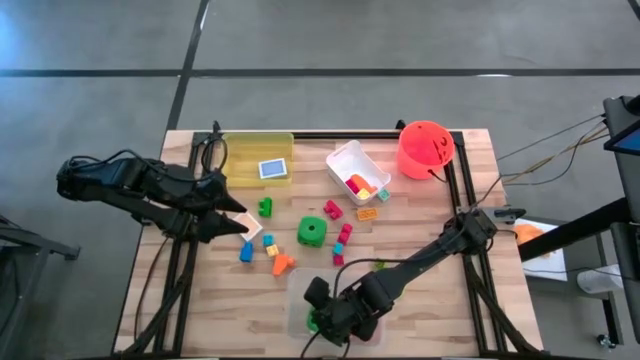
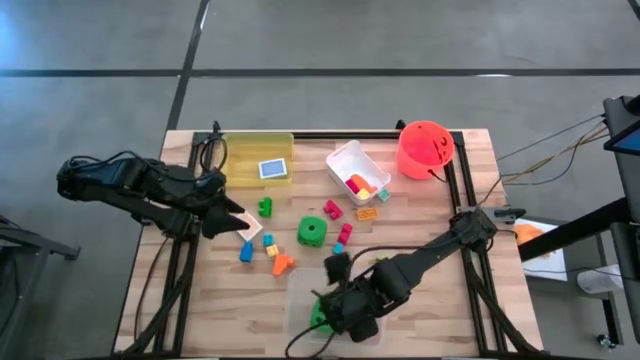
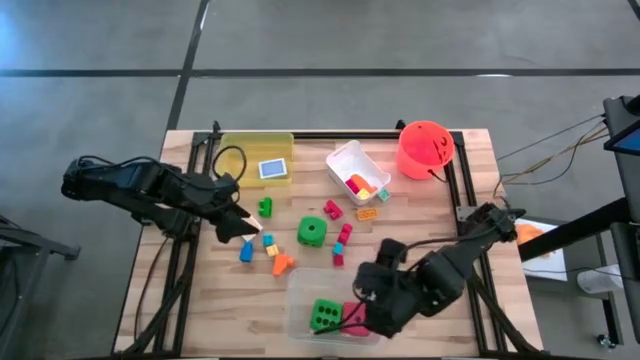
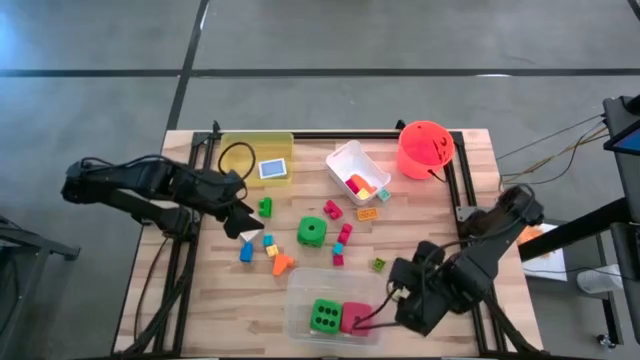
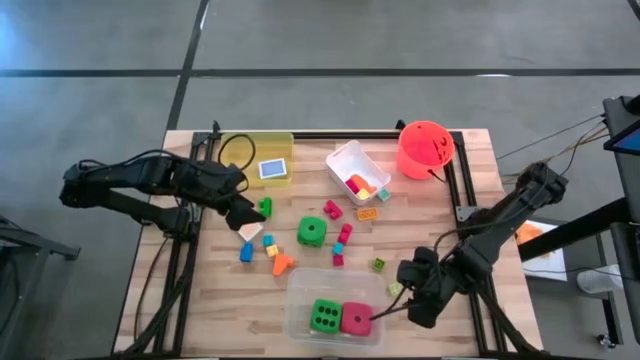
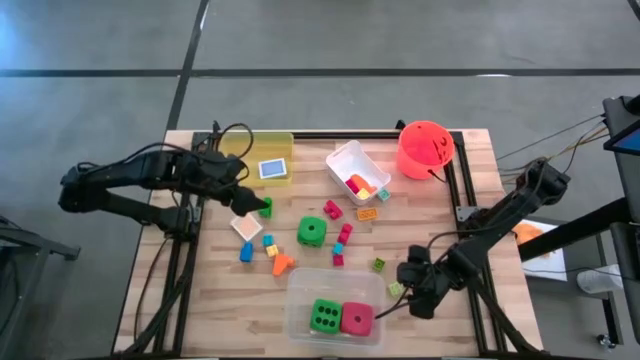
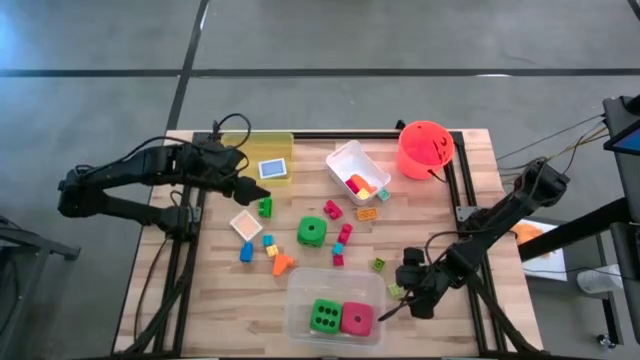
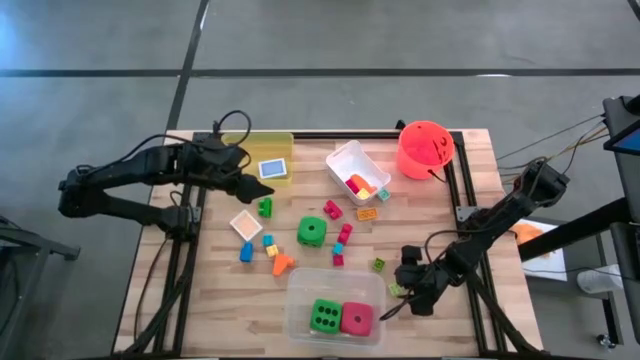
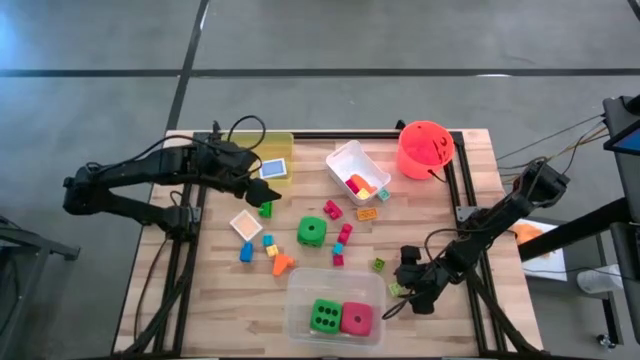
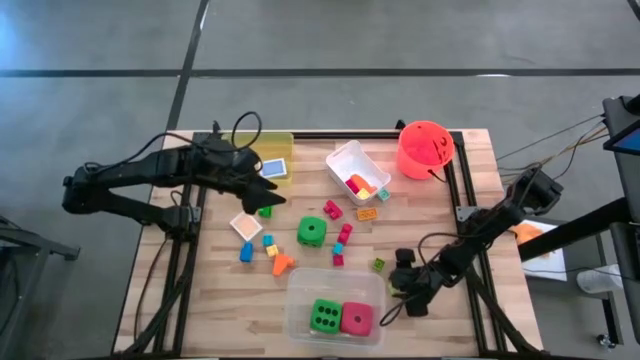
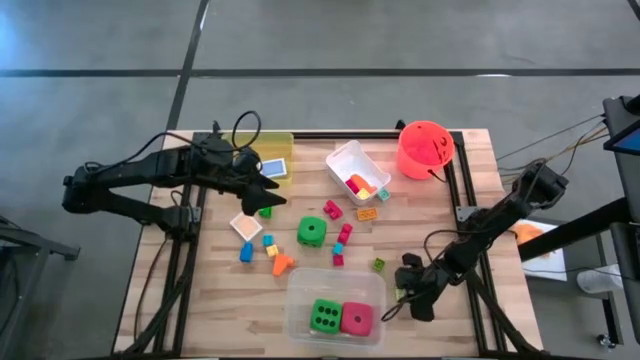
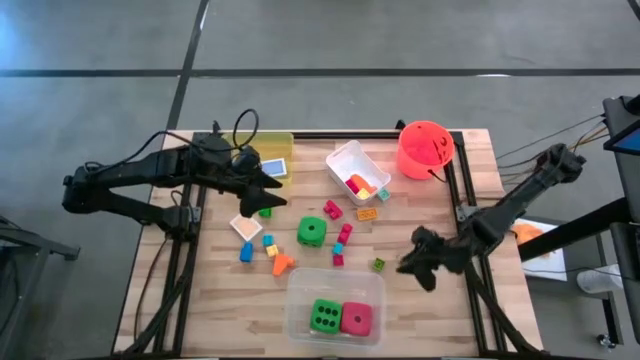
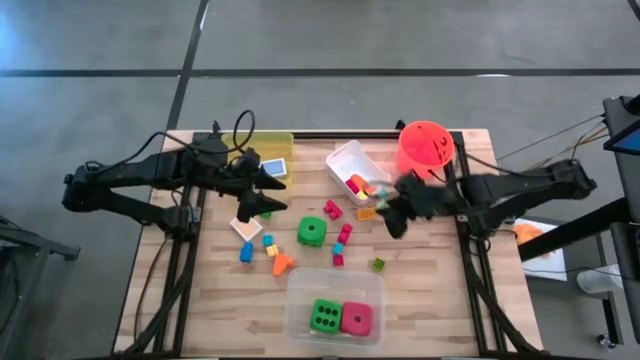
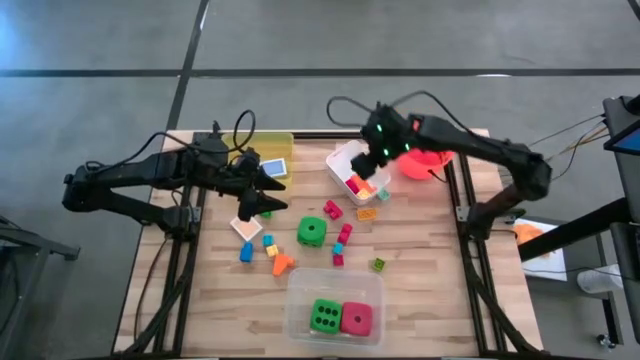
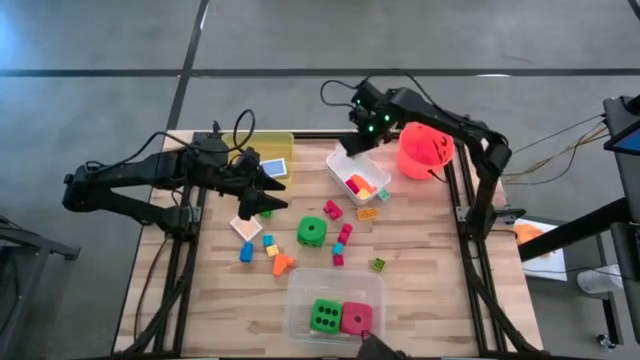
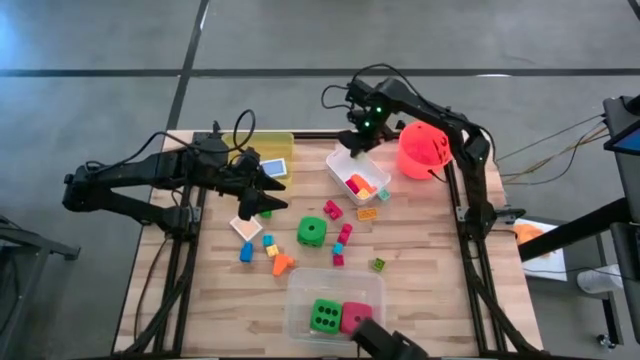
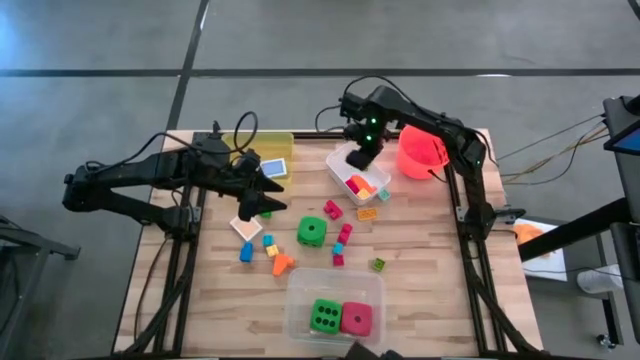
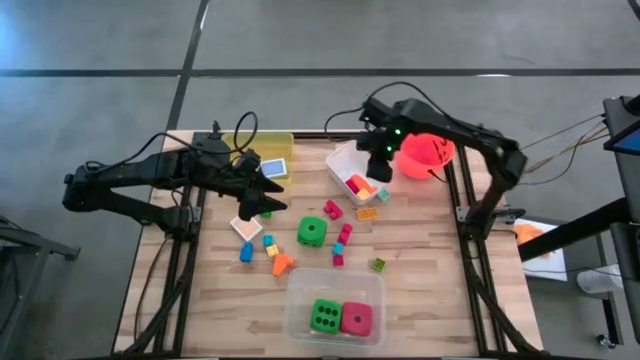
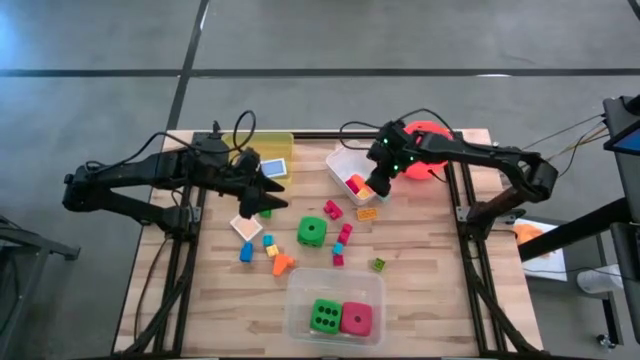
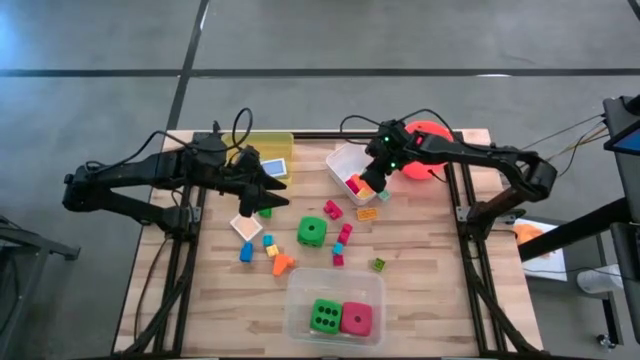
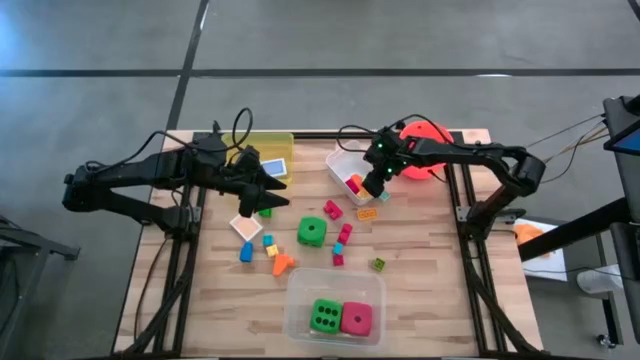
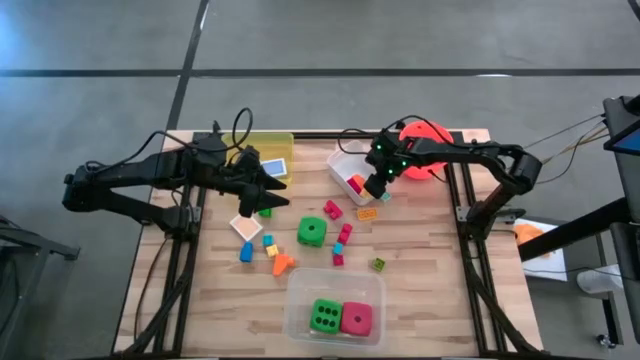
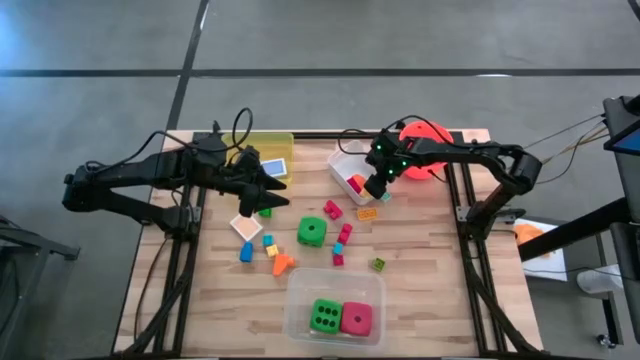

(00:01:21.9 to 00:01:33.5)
Task: Pick & Place Toys
Put the light green game piece into the white bin

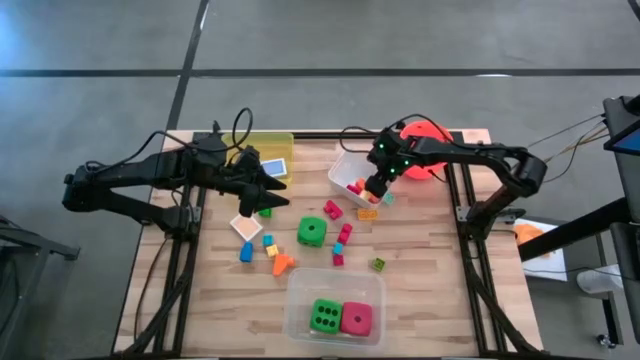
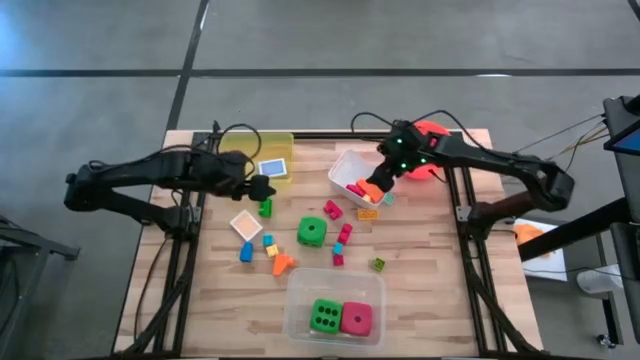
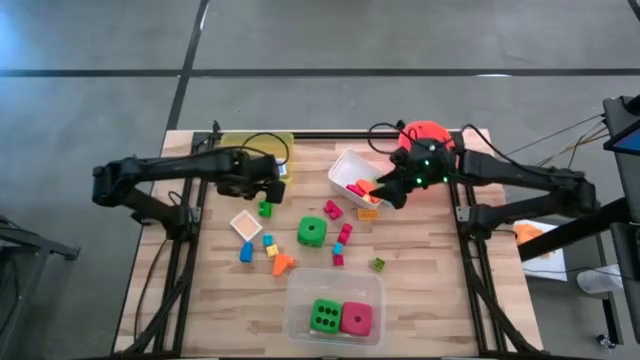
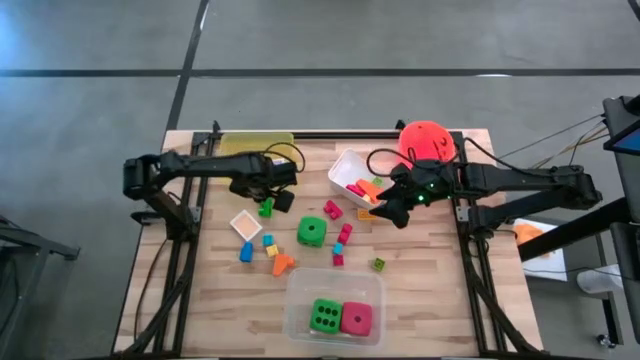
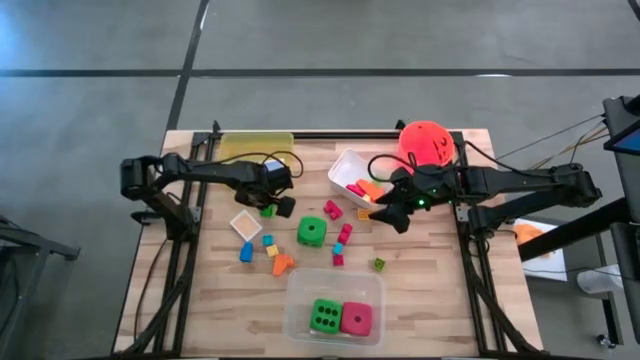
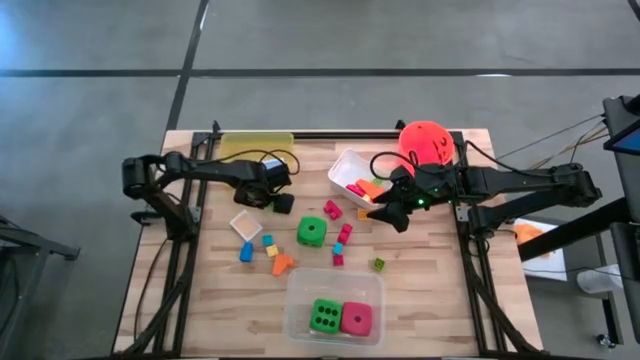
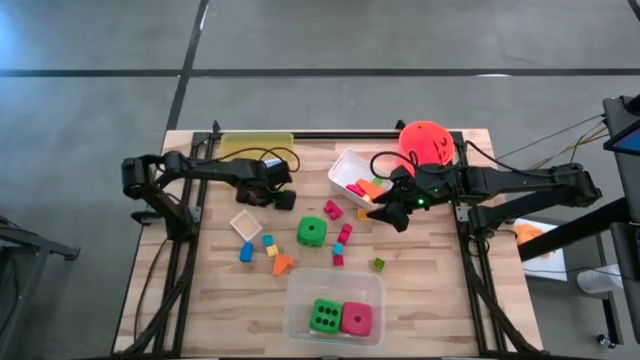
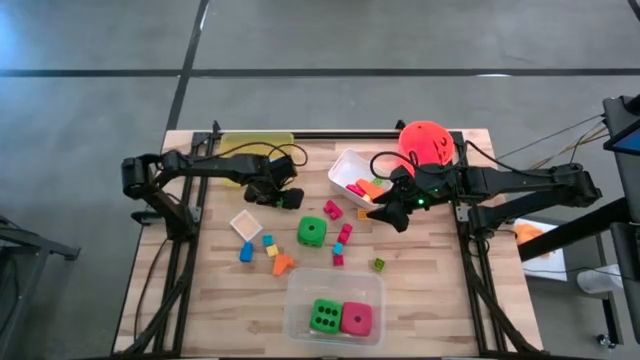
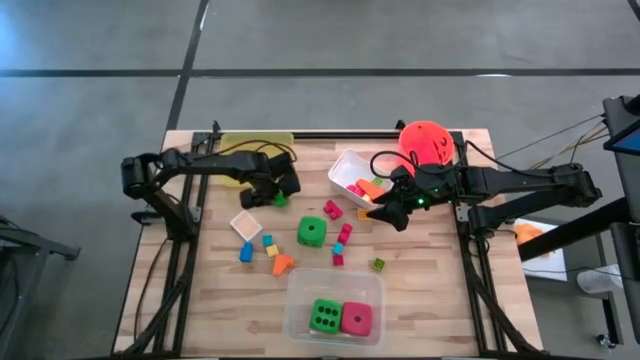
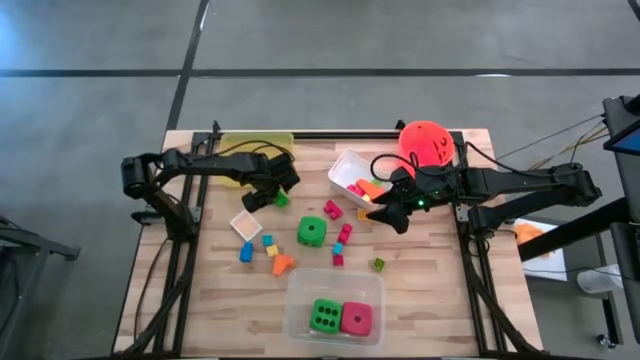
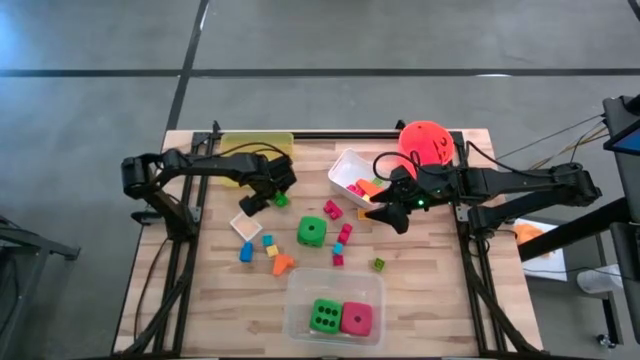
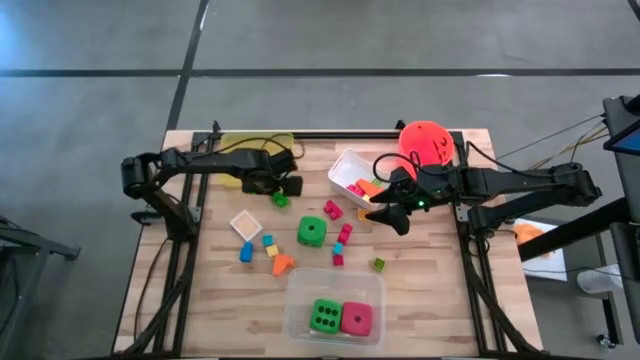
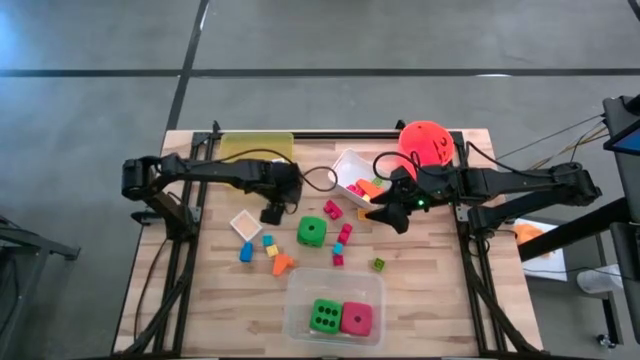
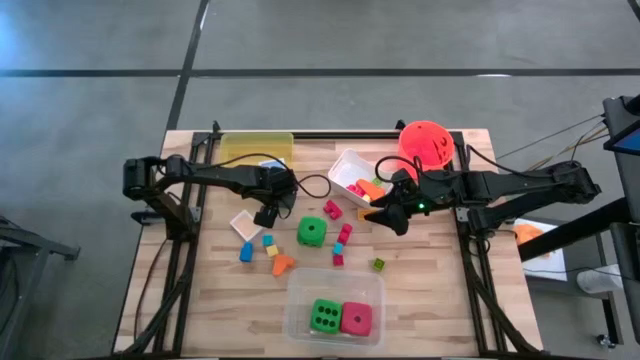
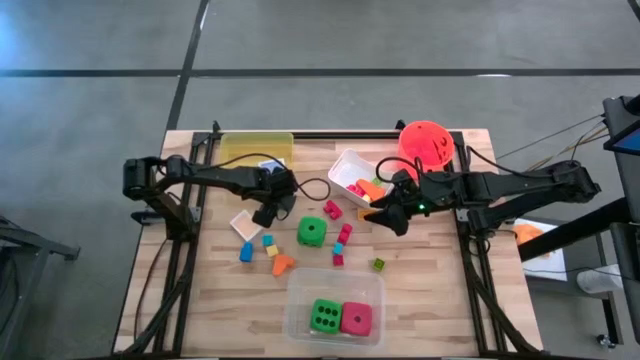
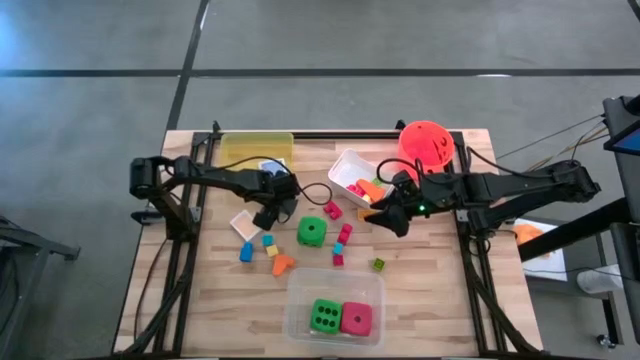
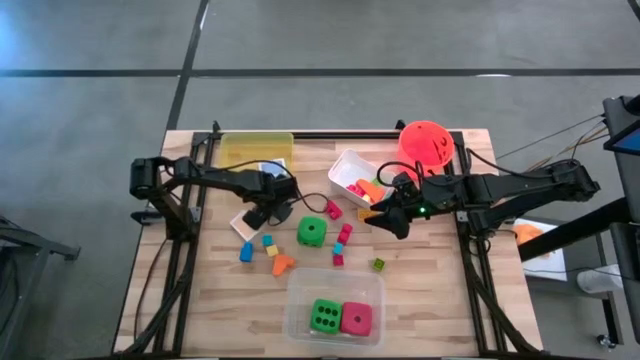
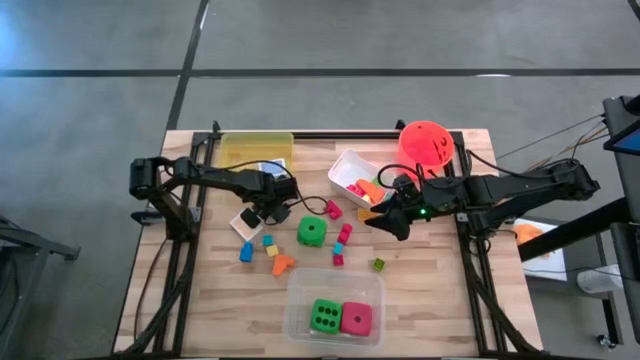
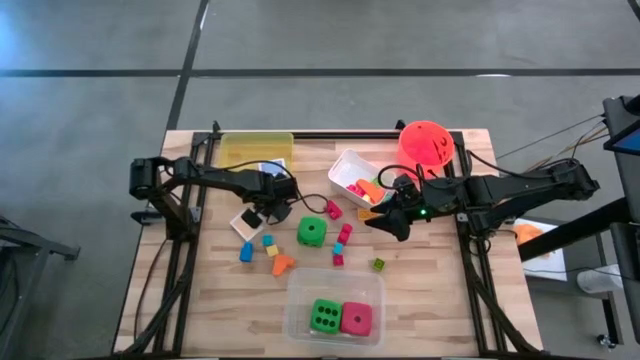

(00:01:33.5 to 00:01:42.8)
Put the green game piece into the white bin
